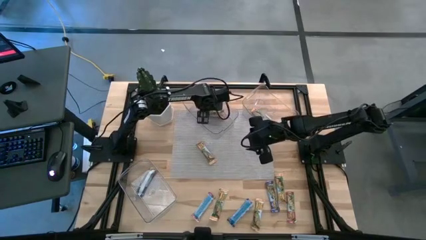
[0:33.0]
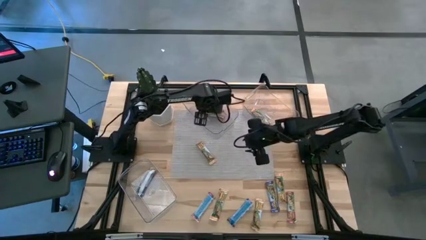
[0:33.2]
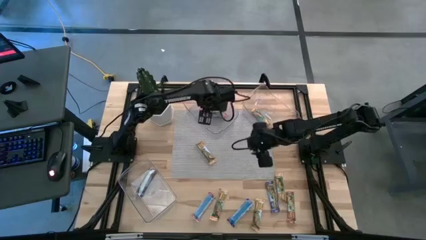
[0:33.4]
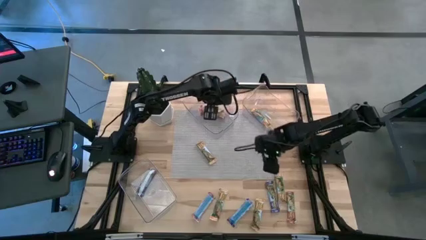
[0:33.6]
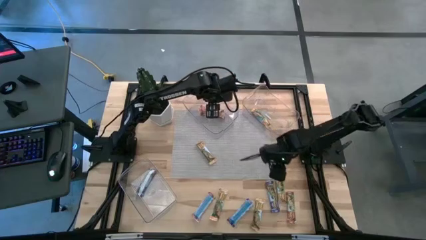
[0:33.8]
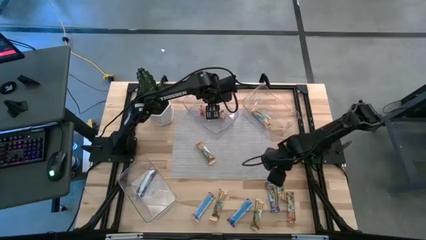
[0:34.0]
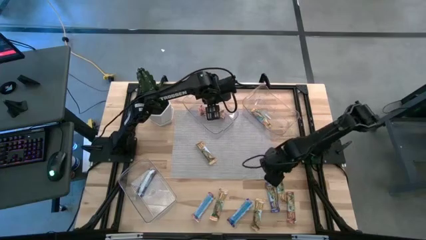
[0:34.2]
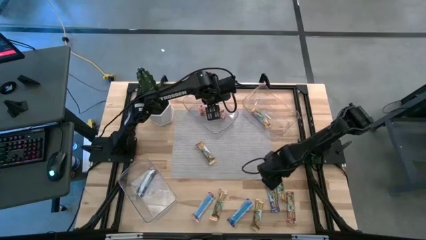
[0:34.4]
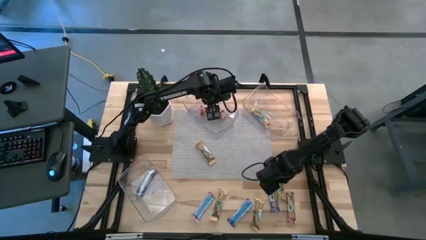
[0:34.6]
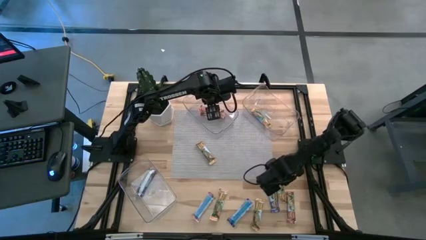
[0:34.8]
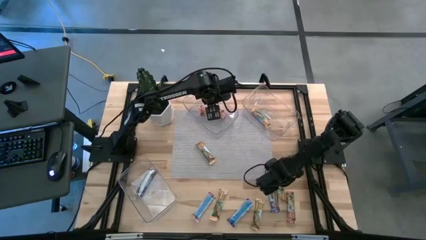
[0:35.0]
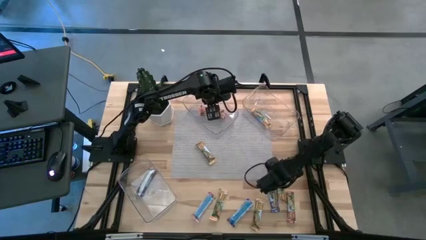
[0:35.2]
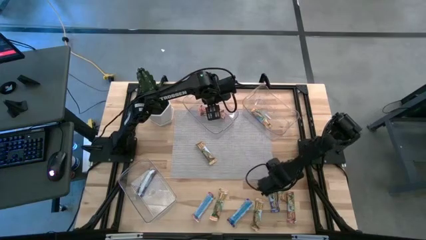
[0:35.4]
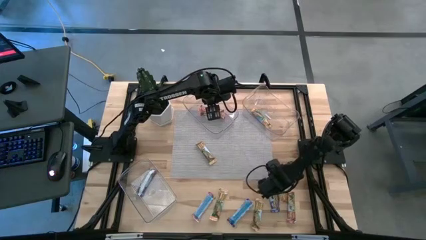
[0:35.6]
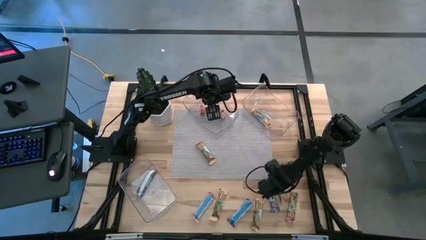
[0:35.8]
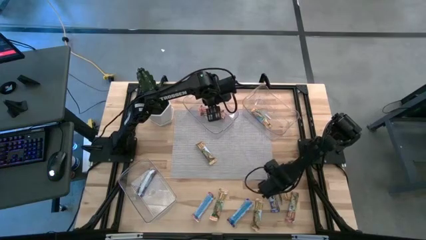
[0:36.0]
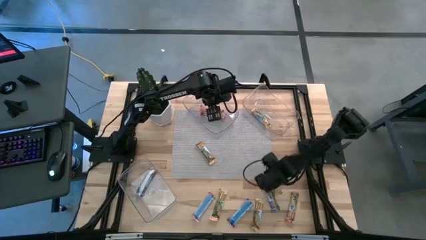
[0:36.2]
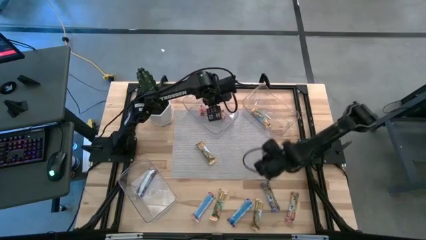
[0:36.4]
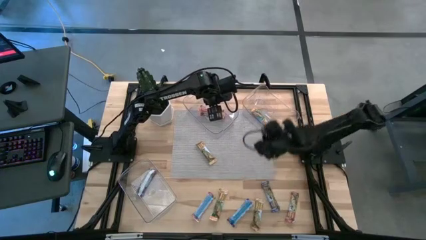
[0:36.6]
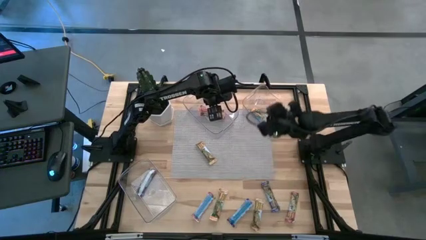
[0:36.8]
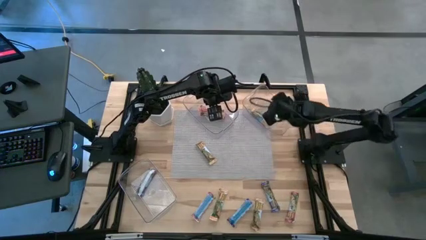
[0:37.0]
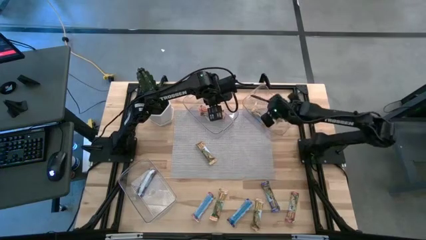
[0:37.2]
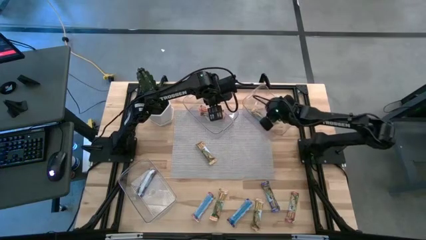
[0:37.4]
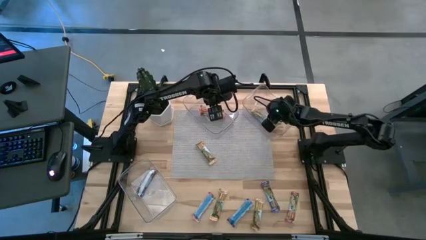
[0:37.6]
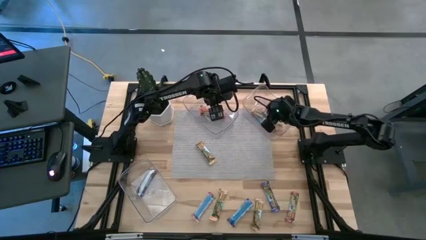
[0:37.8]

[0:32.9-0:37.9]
Task: Pick and place Granola Bars by type
Put the yellow granola bar into the top right transparent bin

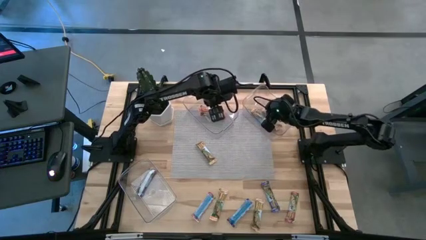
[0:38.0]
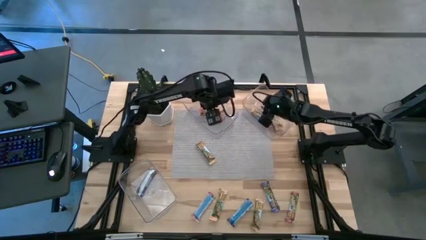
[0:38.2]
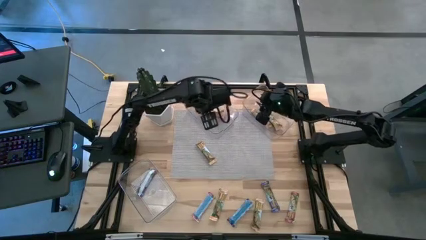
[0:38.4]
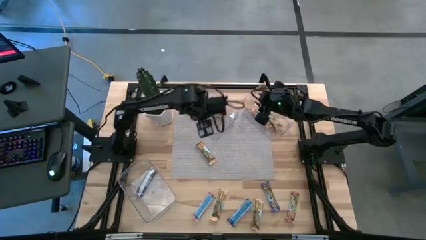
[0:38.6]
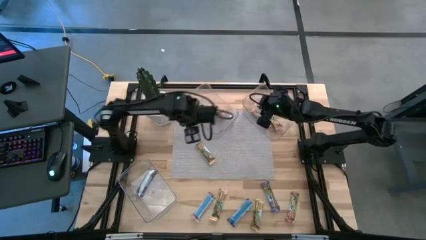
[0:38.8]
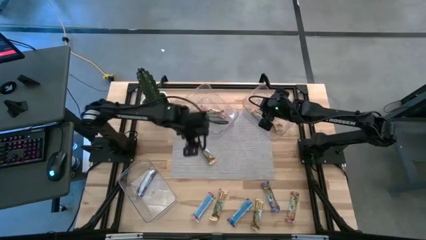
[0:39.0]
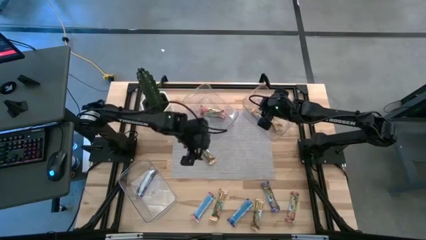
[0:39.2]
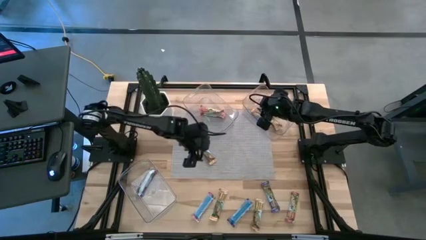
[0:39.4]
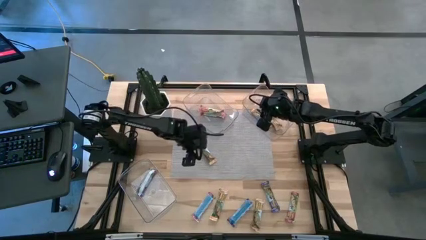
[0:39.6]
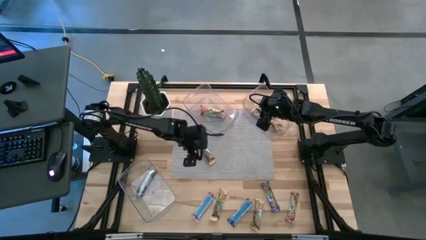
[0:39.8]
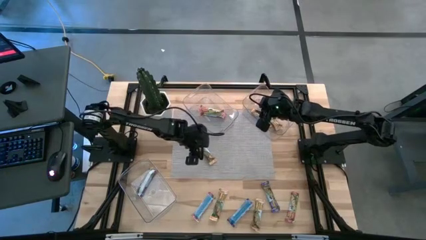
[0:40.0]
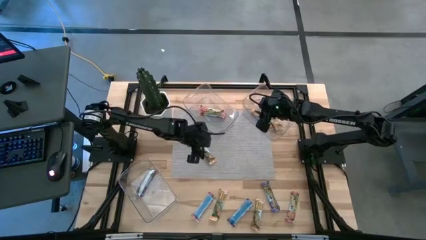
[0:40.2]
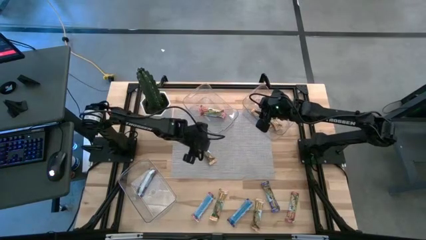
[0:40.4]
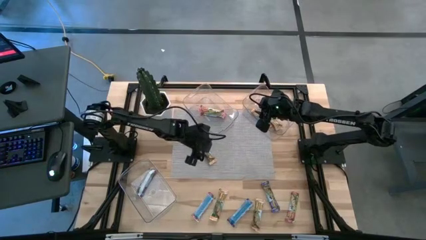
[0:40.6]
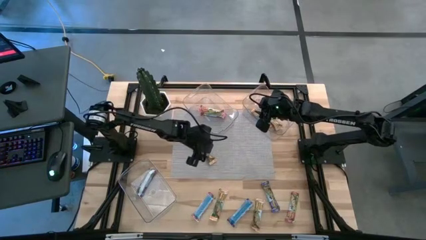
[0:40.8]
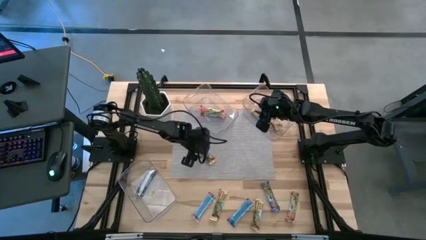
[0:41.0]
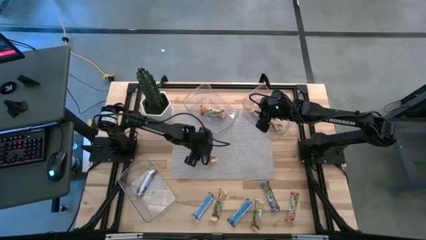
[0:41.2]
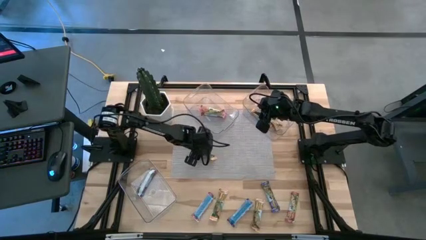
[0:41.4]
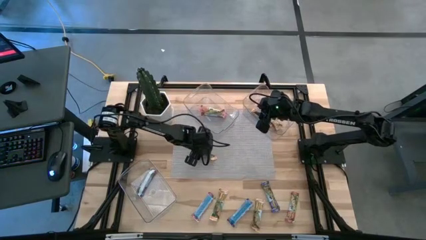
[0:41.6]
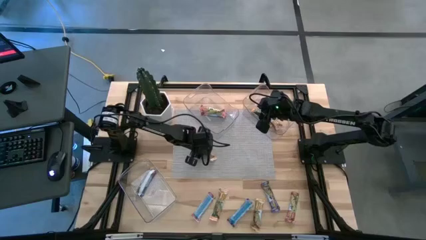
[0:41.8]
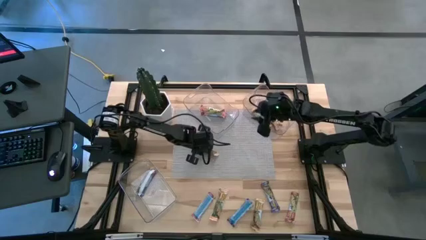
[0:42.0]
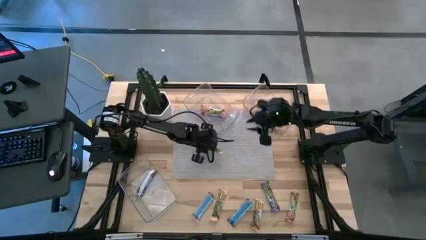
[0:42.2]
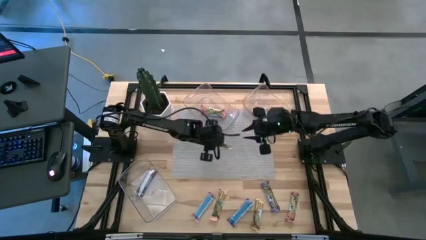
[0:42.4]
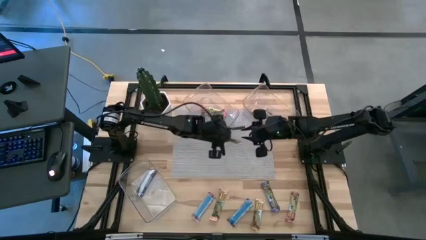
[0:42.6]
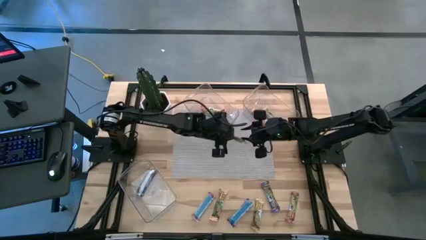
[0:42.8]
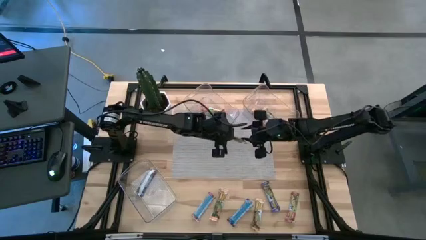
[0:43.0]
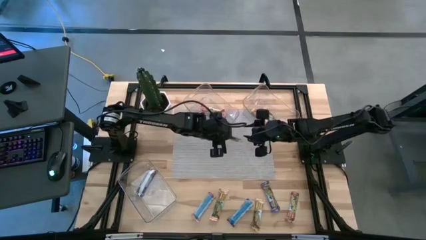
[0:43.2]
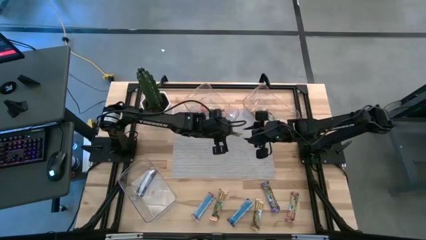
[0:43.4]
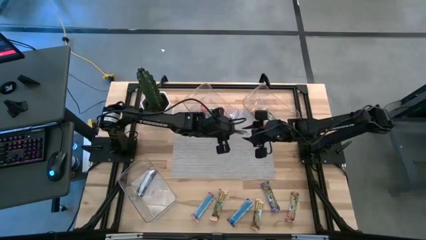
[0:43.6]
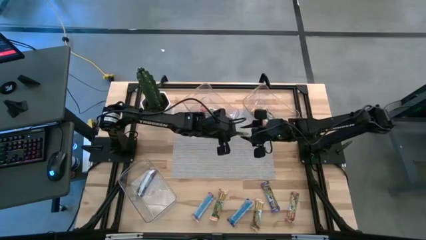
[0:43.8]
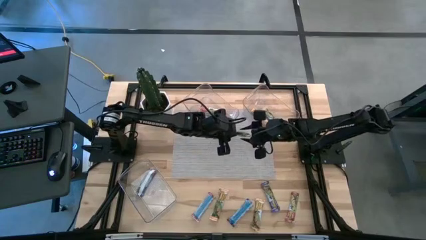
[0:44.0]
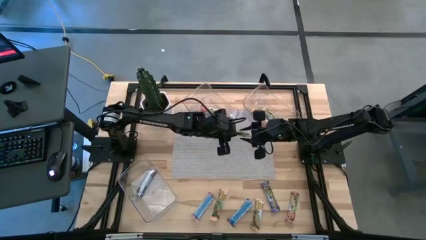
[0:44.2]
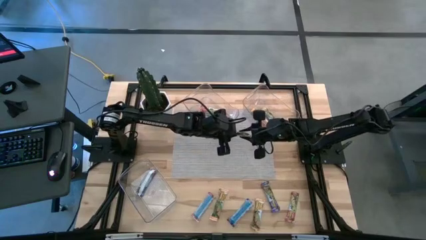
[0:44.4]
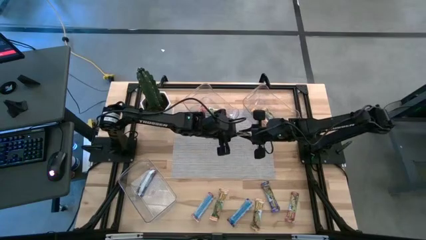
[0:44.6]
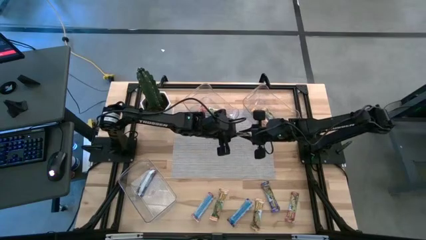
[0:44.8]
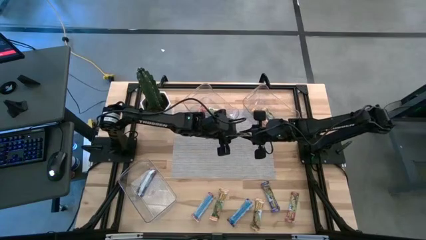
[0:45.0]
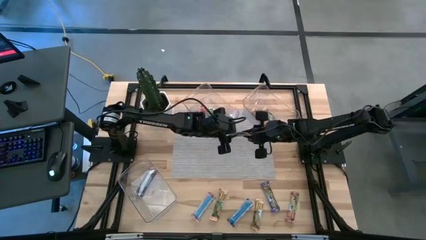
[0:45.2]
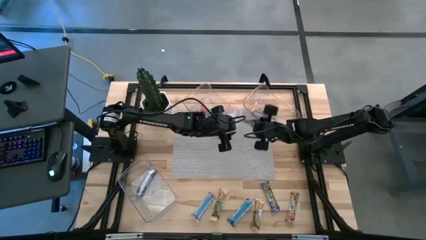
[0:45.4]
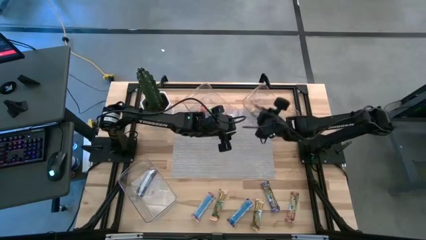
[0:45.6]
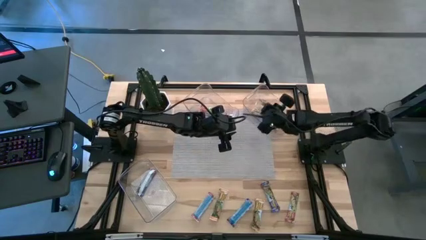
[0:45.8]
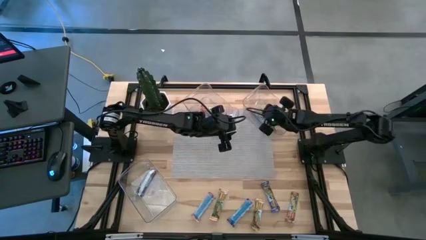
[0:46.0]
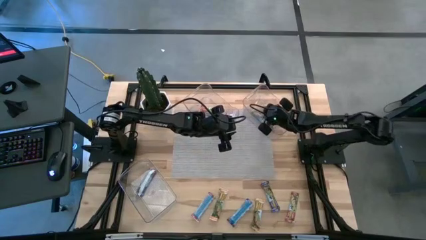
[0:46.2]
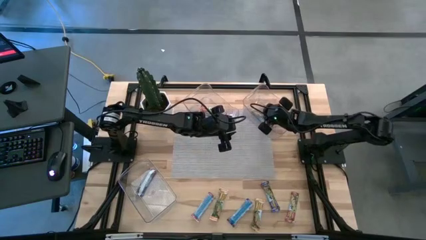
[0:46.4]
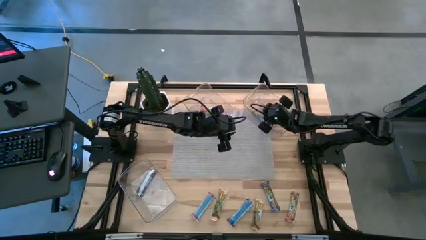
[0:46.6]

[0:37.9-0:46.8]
Put the yellow granola bar into the top right transparent bin

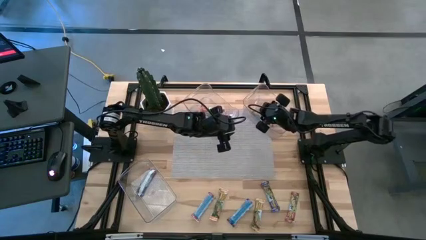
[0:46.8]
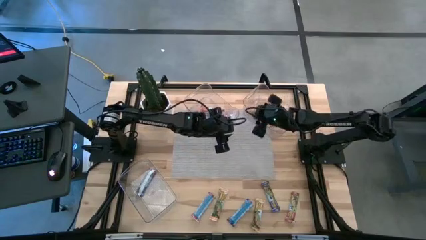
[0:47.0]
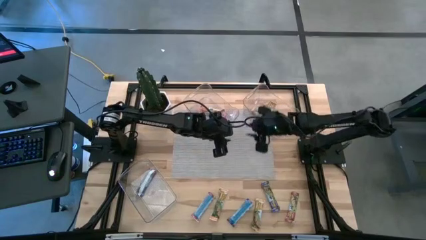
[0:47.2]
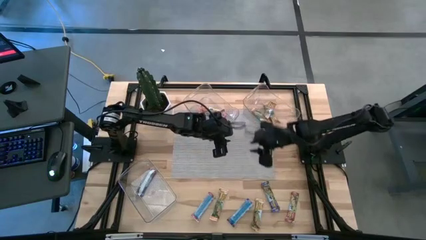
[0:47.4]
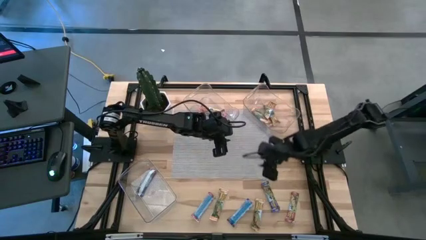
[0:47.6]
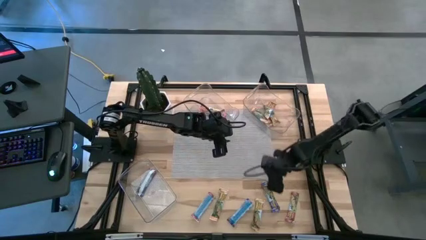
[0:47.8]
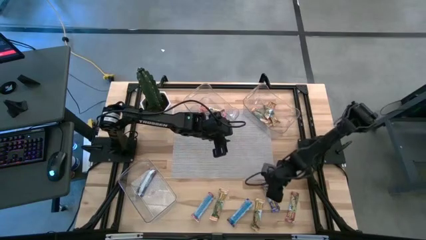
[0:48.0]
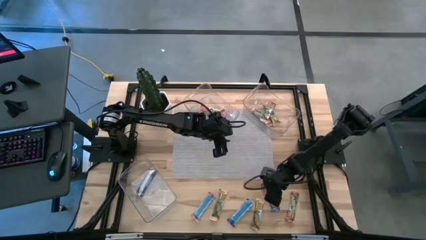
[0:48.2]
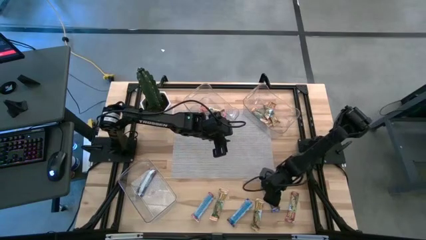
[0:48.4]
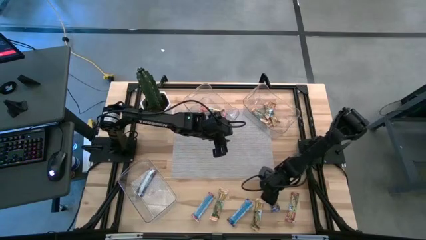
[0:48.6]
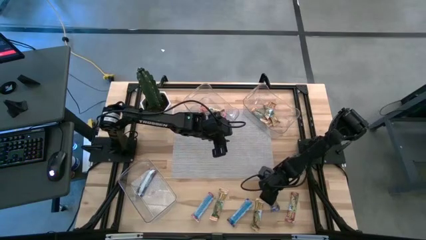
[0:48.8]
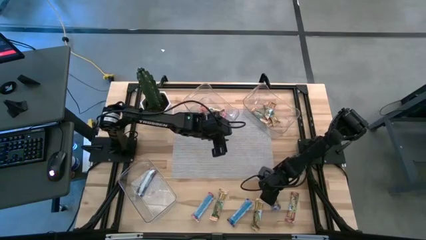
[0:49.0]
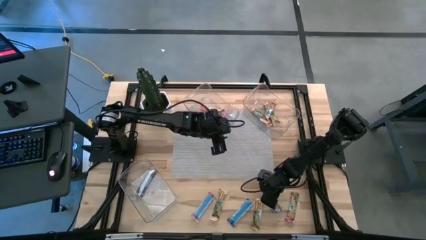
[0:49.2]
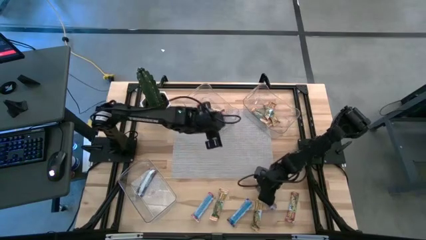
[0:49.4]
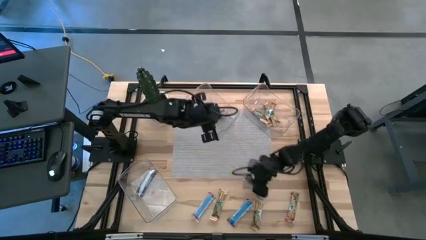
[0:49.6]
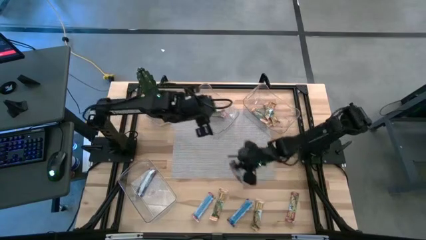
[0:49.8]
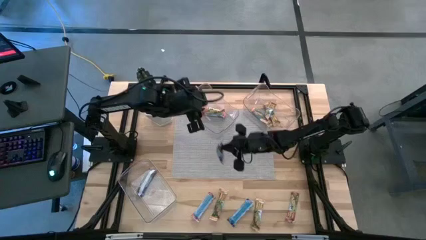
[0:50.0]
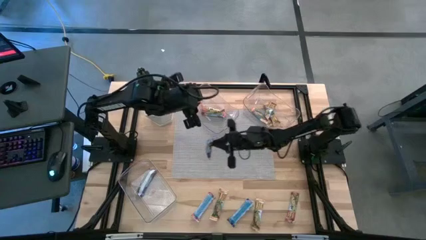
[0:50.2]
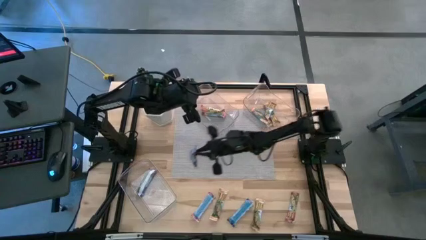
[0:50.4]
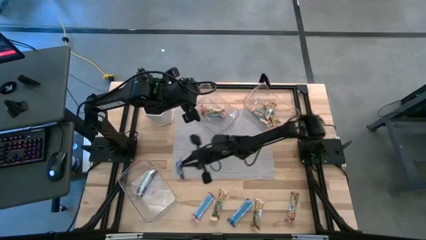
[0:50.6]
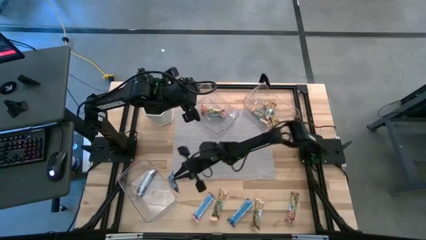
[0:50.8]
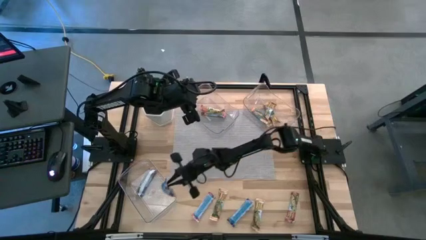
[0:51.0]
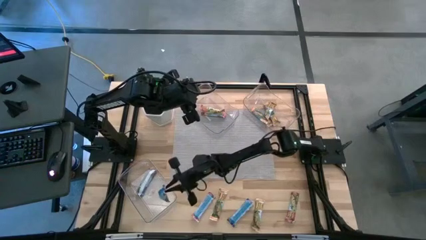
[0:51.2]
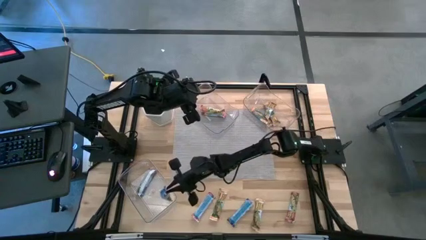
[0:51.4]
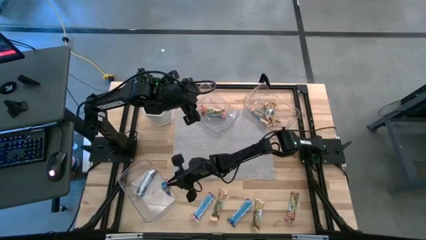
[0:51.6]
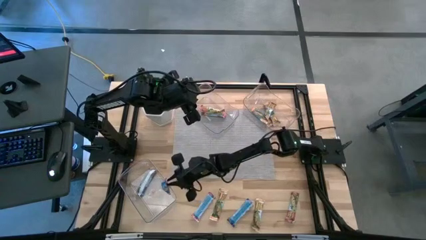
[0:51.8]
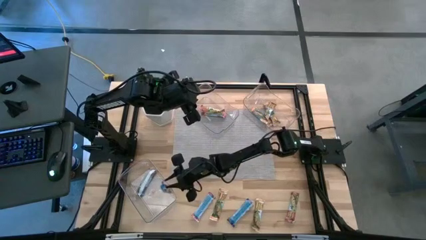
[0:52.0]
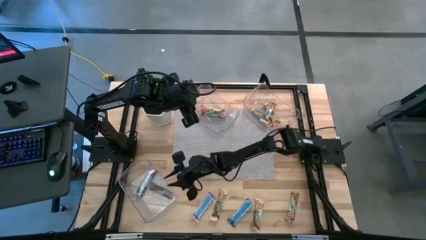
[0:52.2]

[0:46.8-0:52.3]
Put the blue granola bar into the bottom transparent bin
